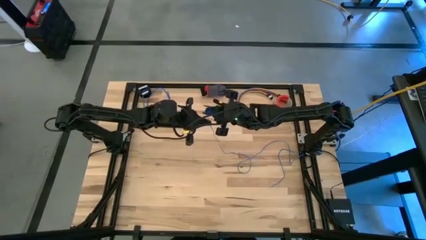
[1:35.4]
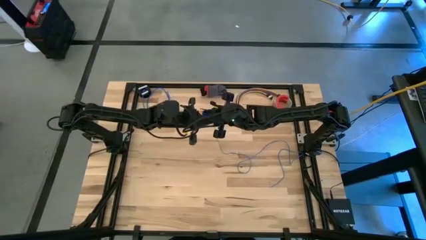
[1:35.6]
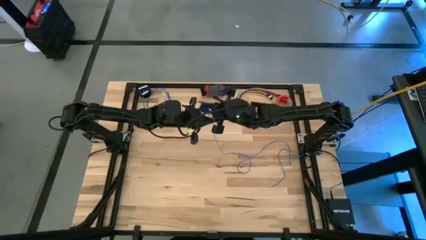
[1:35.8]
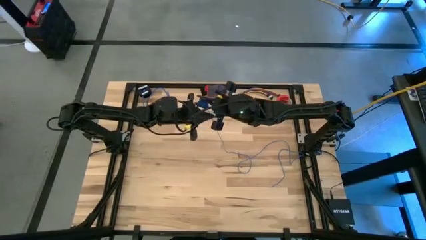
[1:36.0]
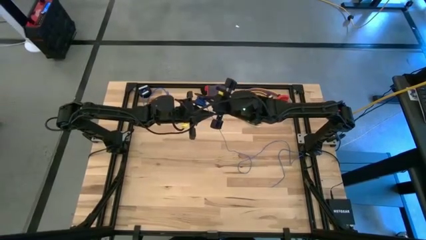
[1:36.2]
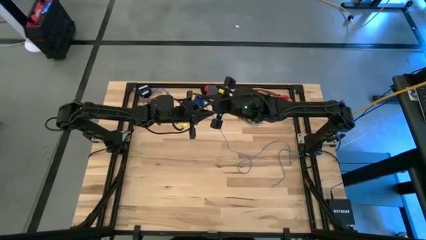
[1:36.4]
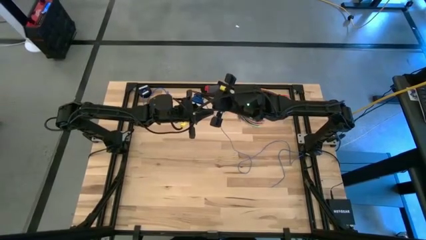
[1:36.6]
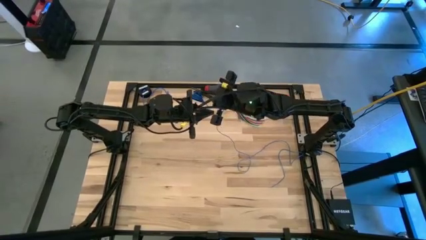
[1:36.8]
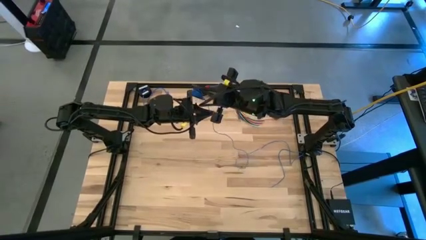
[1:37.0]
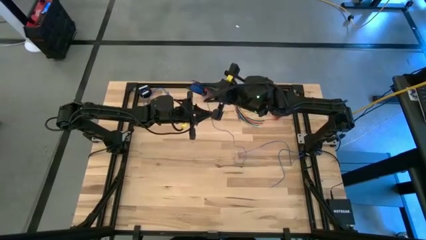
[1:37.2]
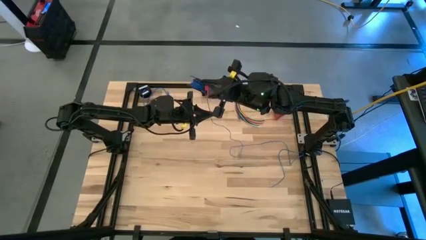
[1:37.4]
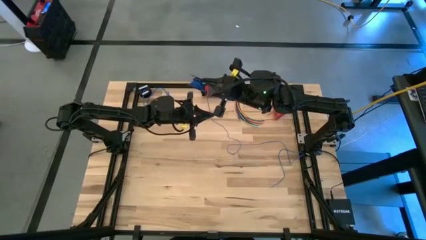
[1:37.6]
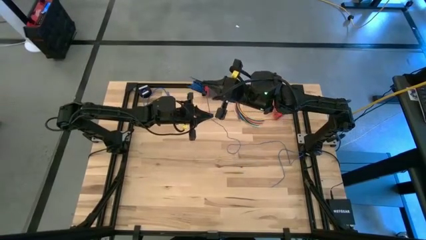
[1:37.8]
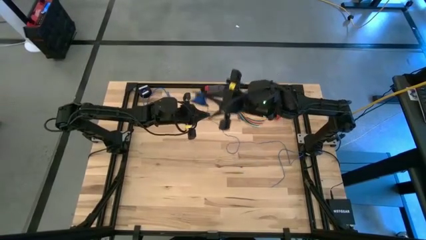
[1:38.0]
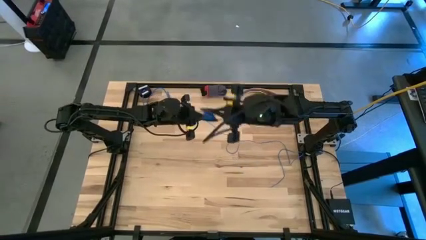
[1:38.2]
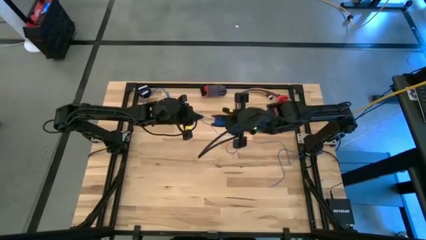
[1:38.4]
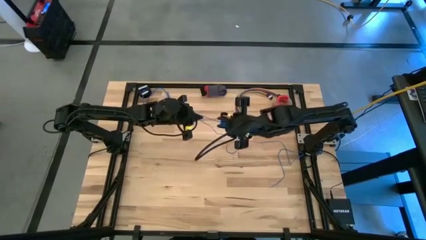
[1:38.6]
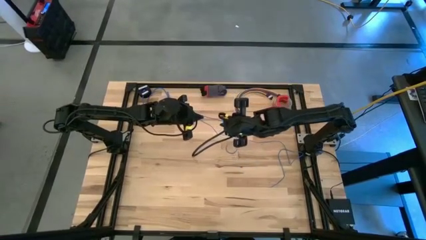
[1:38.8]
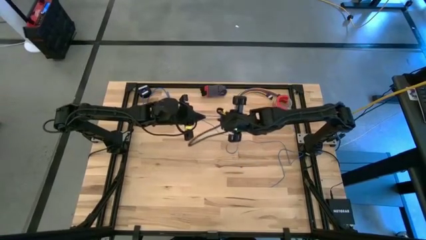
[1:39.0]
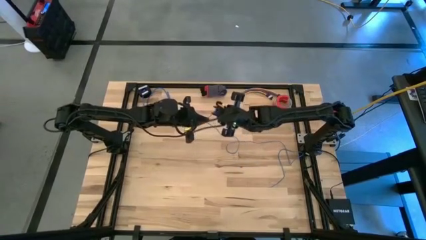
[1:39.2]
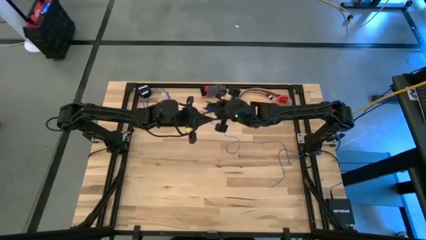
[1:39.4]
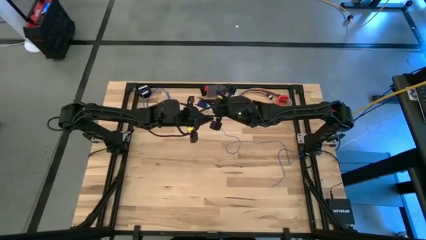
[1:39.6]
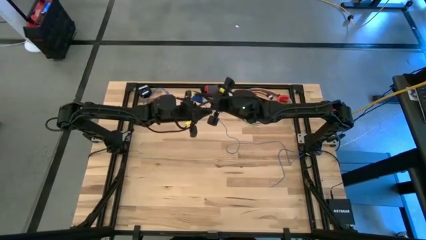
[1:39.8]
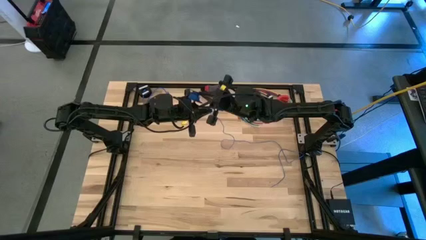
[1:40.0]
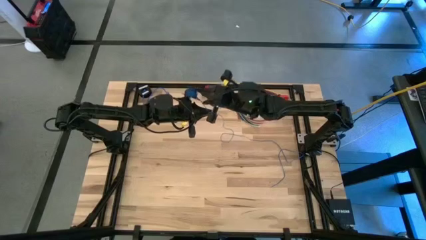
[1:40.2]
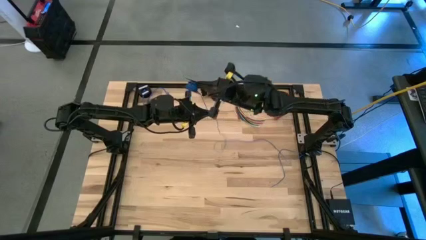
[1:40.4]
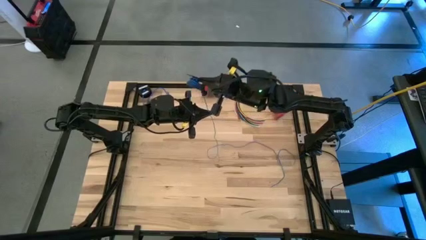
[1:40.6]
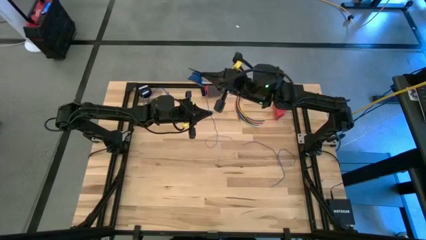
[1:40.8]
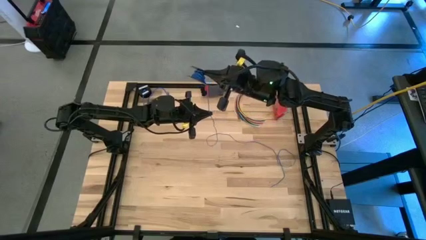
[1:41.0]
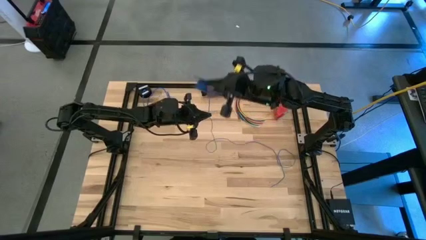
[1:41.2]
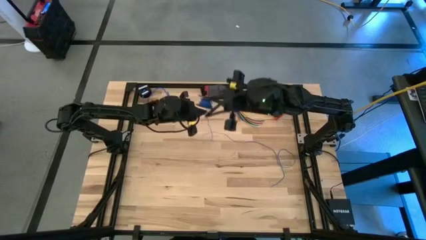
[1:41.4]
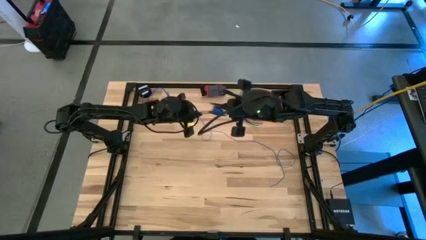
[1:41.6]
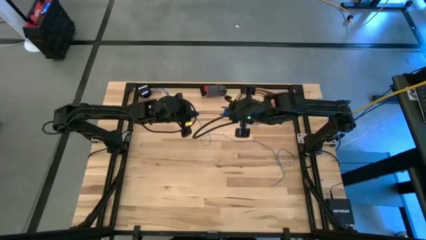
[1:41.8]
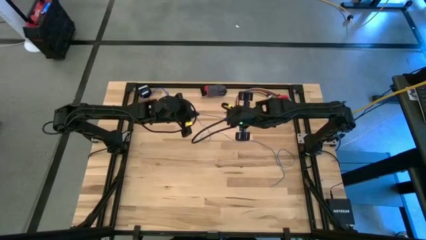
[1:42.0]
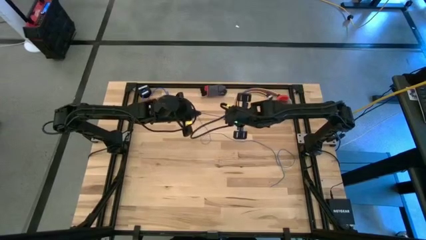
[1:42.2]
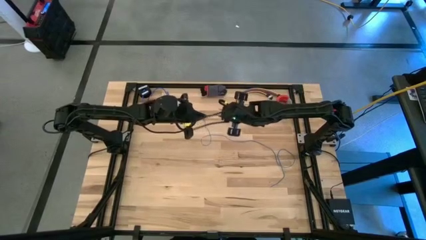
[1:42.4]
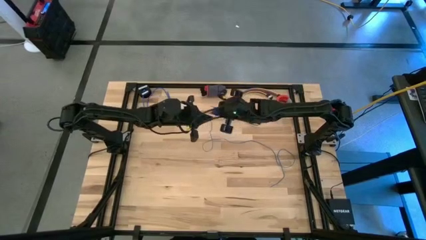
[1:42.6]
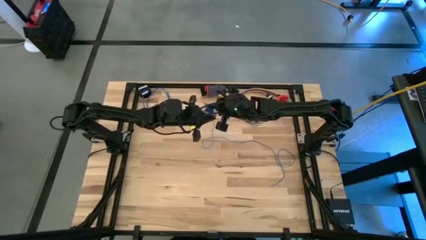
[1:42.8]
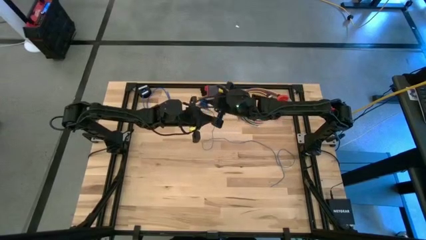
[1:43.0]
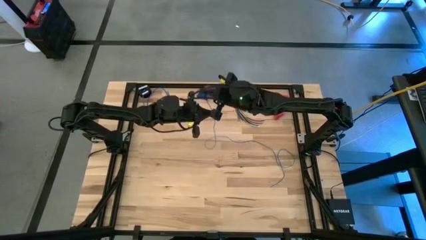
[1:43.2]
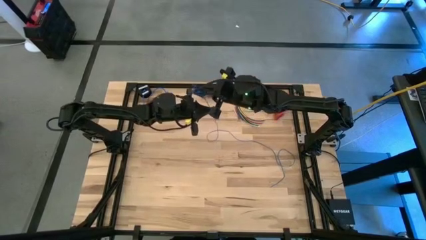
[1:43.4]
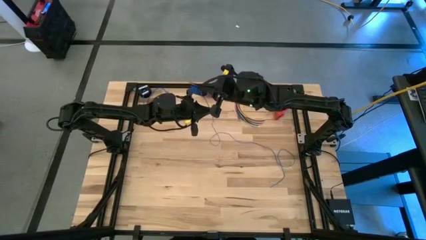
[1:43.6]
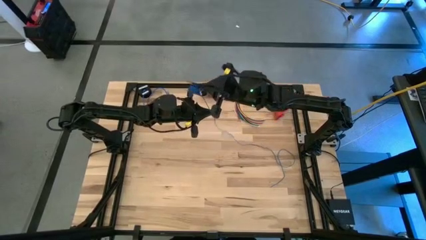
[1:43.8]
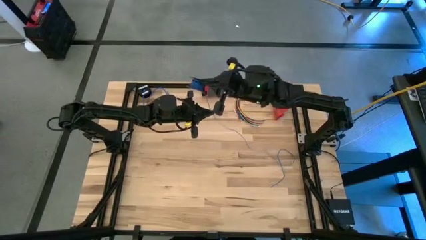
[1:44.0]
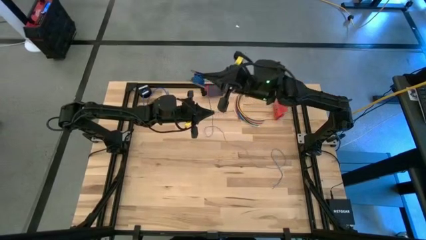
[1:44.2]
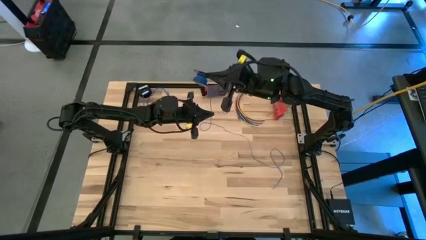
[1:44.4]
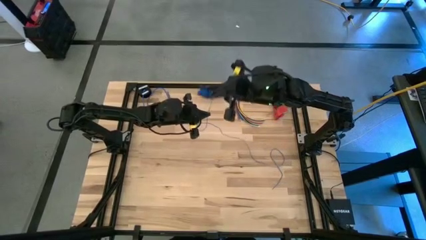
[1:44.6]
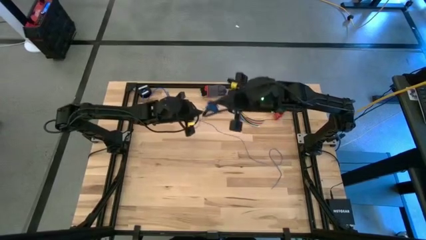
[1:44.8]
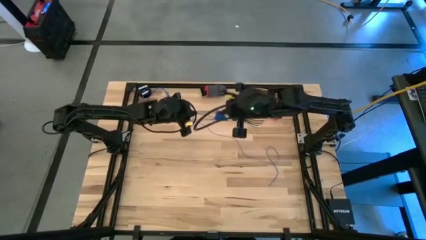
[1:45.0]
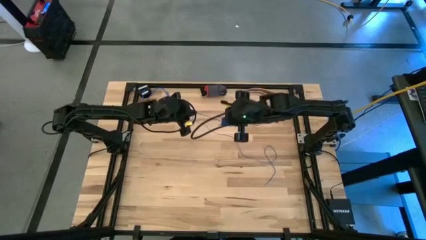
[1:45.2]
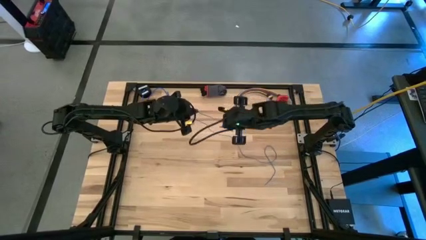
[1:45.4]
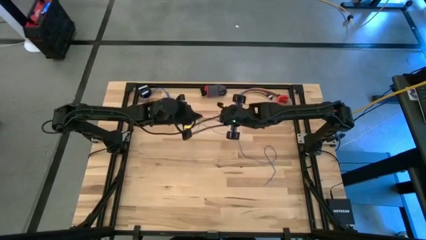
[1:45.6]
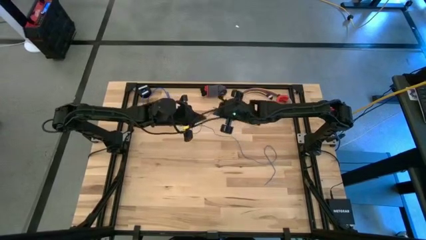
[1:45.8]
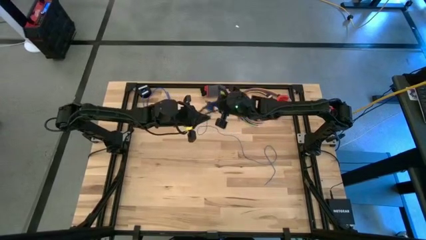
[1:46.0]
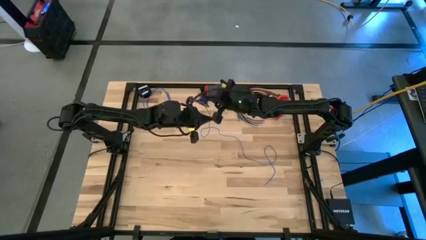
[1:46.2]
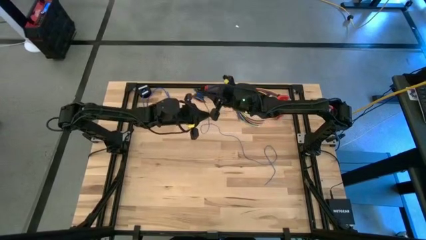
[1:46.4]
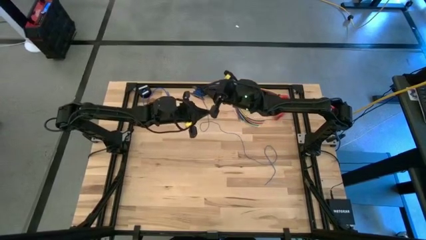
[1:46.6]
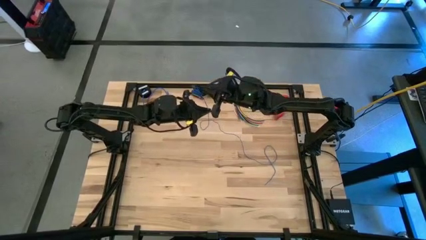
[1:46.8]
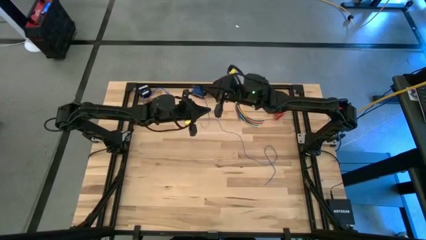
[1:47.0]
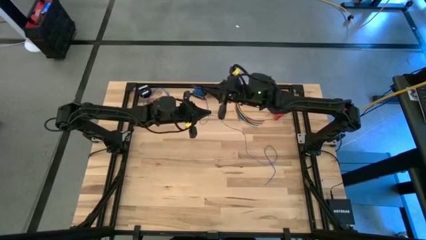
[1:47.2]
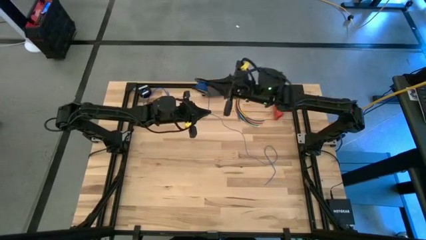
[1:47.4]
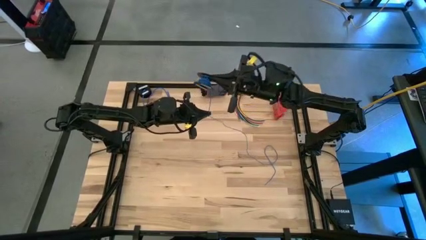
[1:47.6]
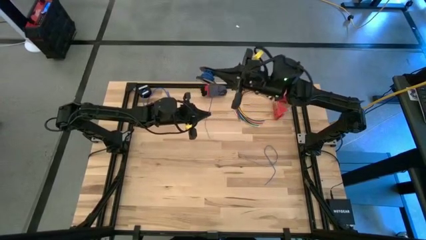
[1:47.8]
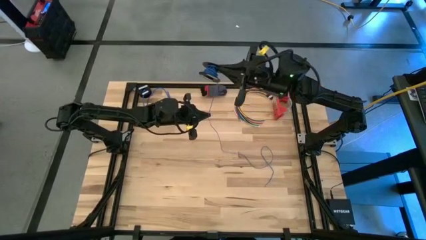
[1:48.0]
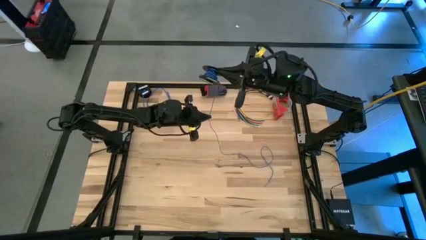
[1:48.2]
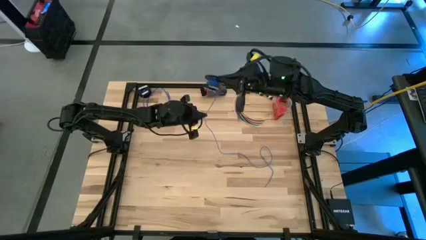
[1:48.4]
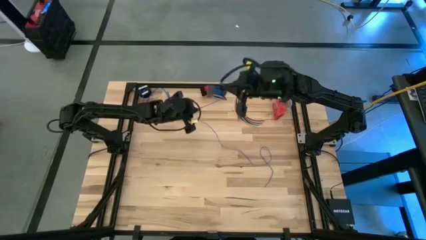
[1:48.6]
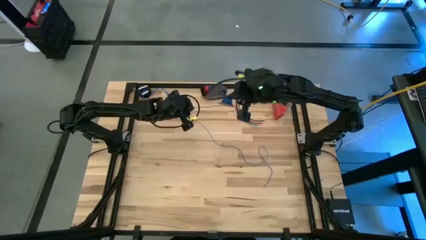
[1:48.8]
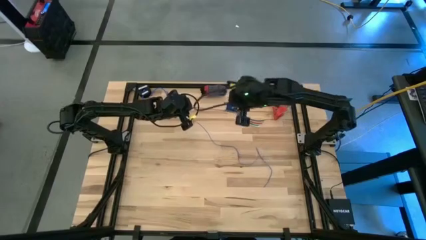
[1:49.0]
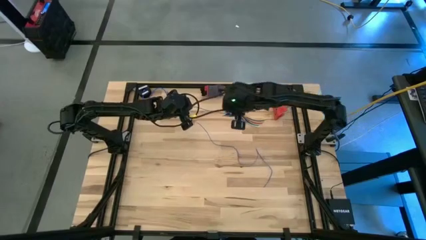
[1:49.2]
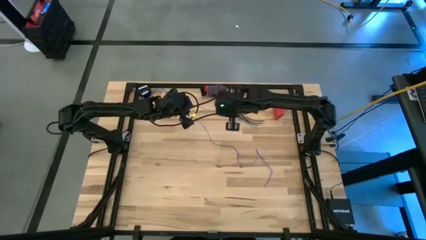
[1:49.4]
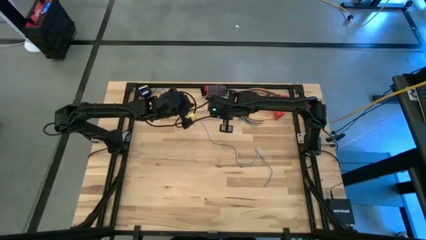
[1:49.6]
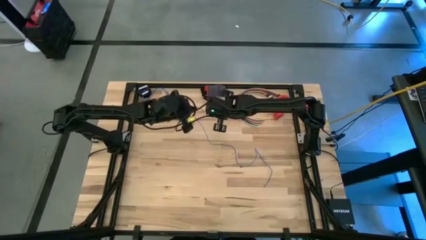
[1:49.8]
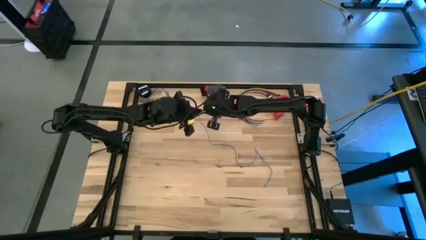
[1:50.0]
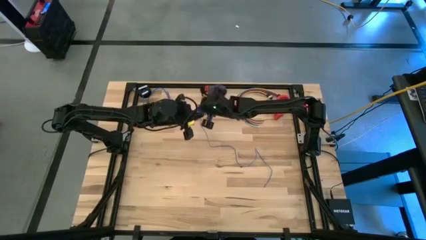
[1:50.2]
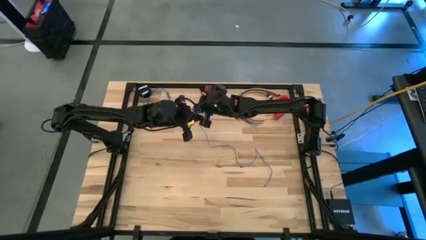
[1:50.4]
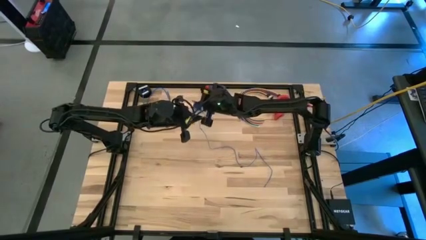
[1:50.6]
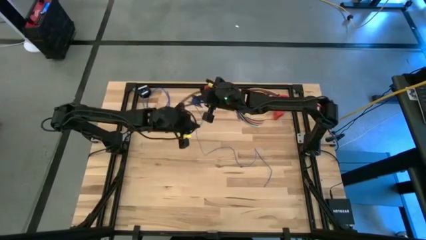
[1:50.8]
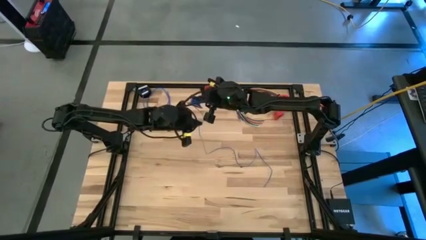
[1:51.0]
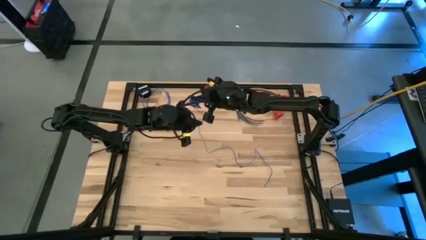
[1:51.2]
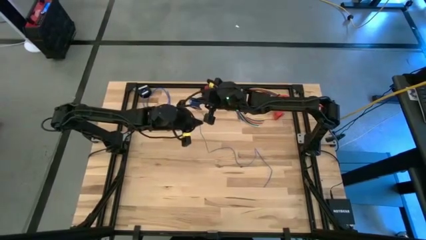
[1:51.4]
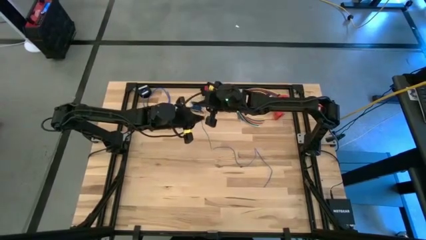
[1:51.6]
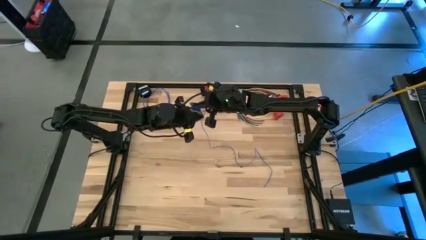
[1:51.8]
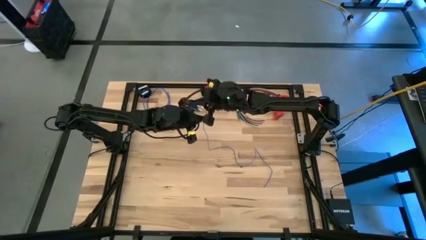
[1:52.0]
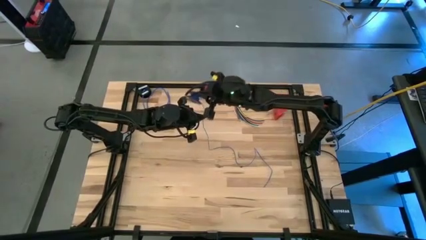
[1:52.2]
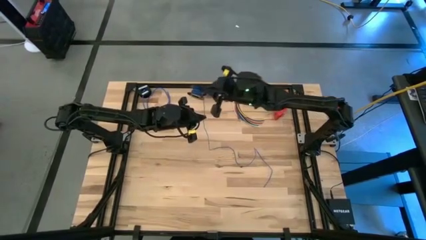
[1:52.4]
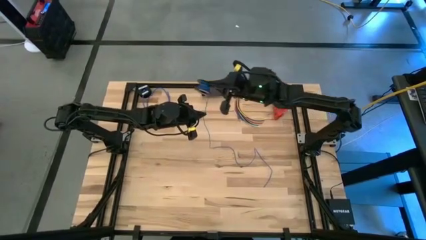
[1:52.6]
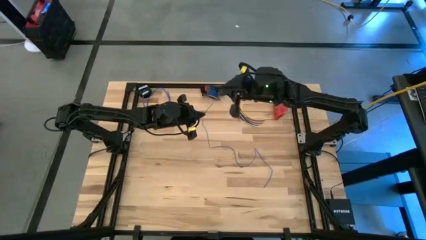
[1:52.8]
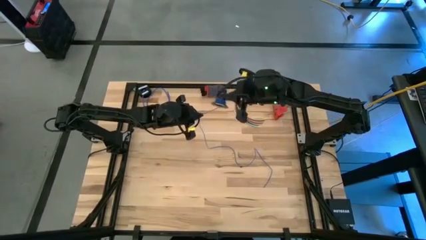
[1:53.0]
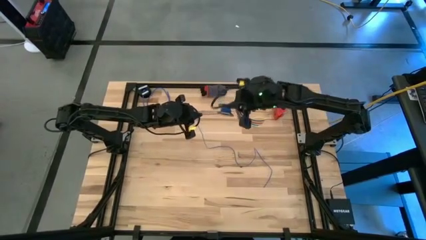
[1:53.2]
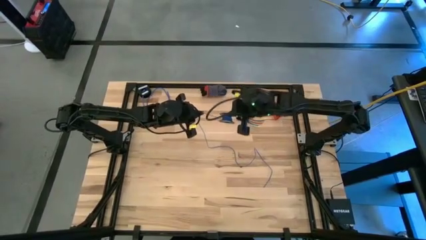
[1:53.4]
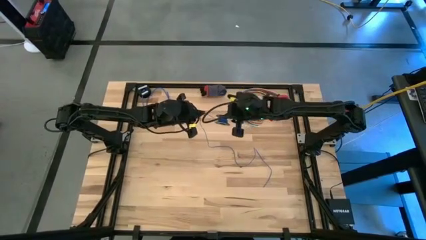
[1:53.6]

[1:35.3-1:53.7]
Task: Coil cords
Coil the blue wire on the black spool
